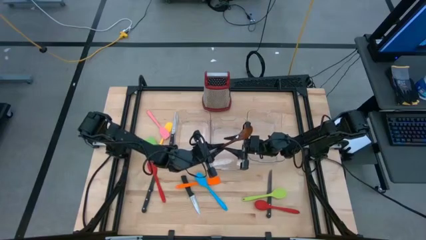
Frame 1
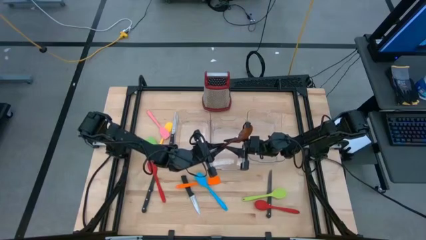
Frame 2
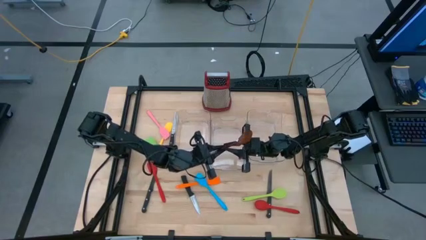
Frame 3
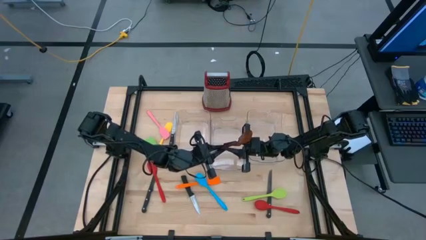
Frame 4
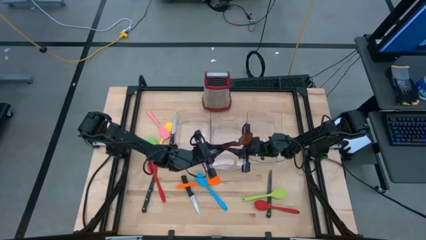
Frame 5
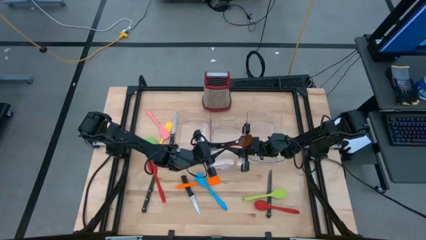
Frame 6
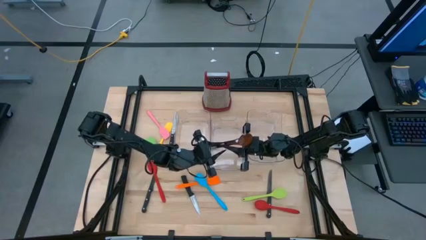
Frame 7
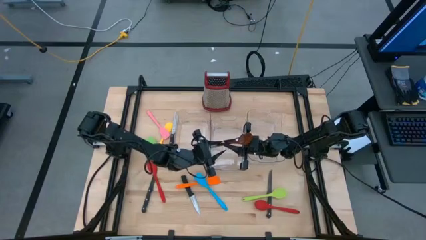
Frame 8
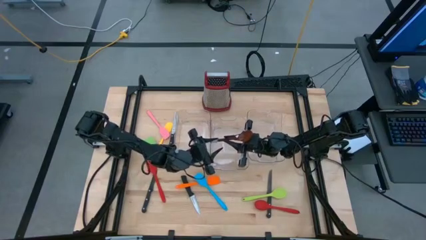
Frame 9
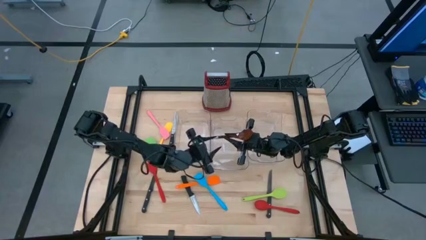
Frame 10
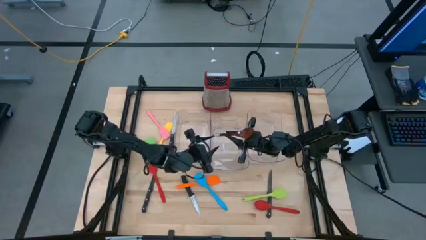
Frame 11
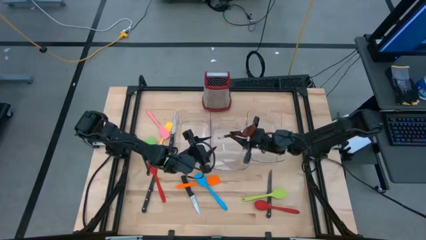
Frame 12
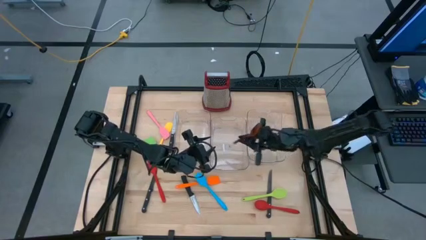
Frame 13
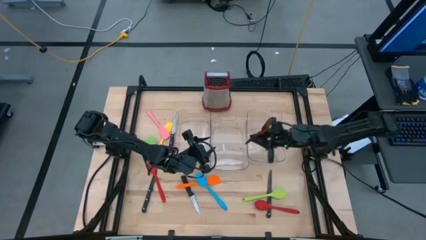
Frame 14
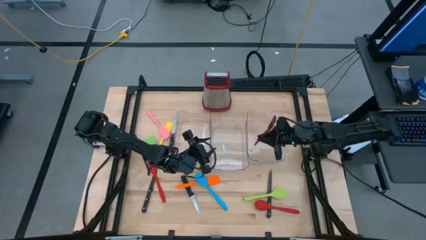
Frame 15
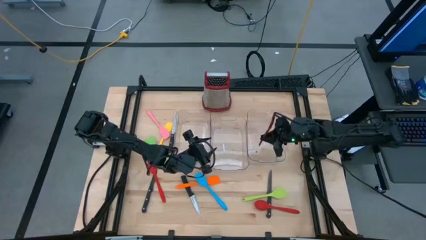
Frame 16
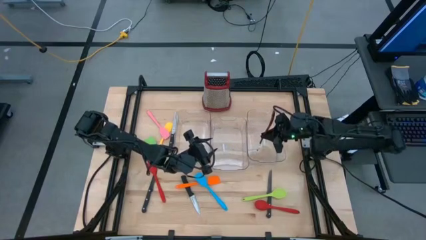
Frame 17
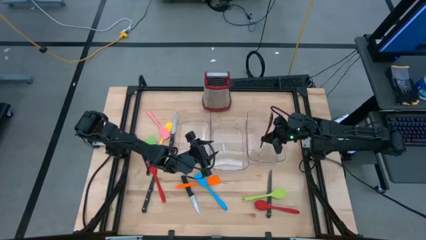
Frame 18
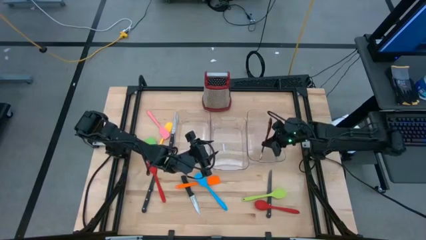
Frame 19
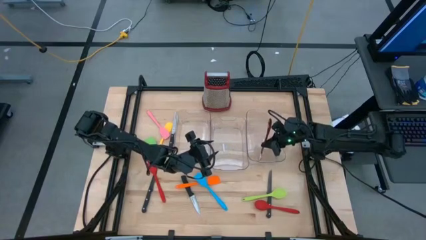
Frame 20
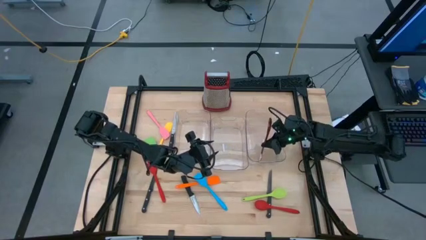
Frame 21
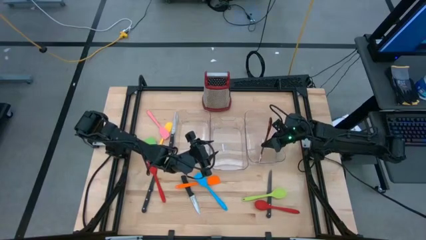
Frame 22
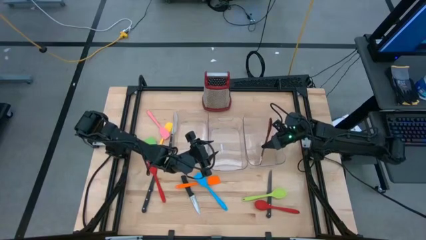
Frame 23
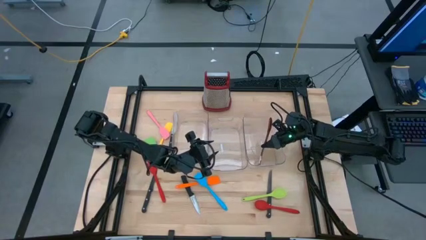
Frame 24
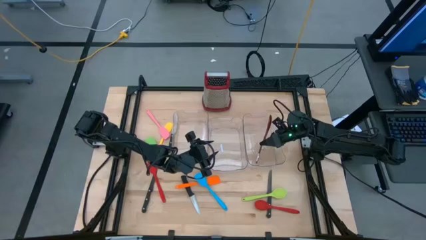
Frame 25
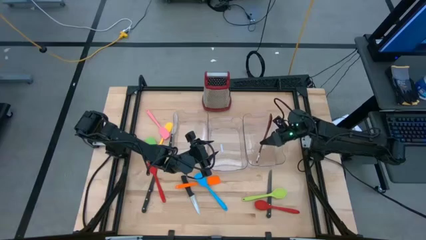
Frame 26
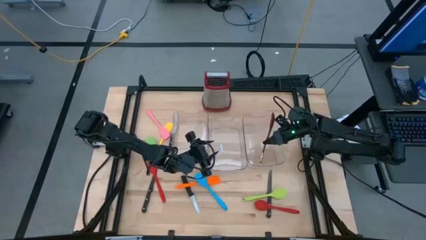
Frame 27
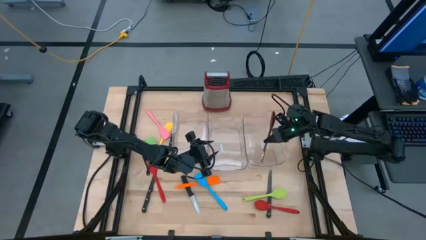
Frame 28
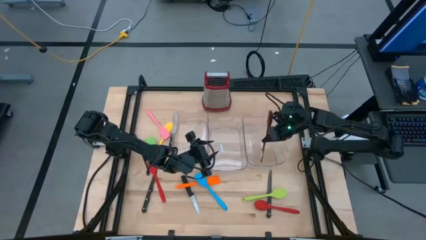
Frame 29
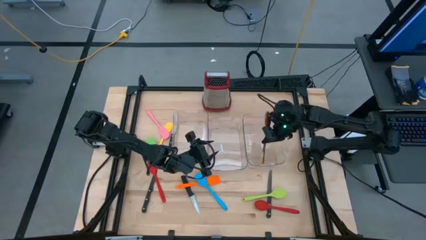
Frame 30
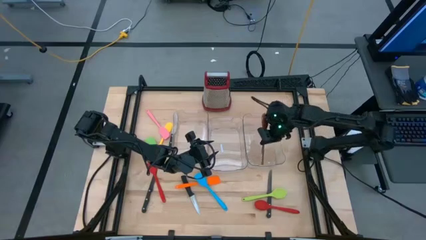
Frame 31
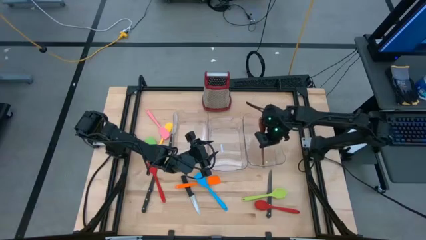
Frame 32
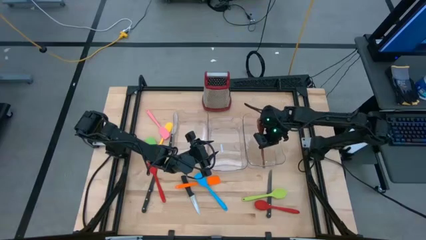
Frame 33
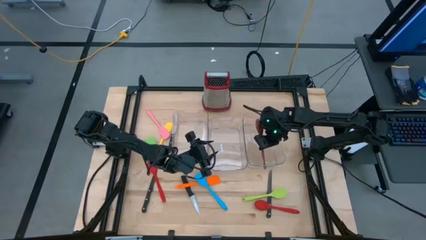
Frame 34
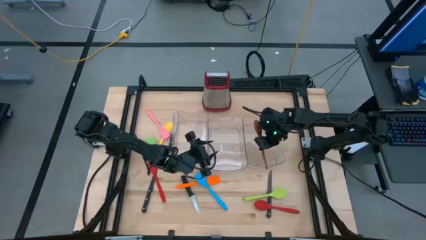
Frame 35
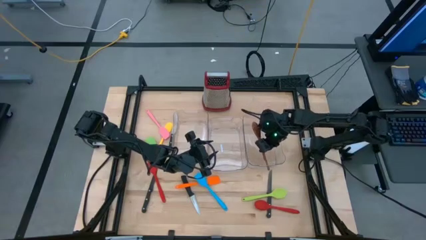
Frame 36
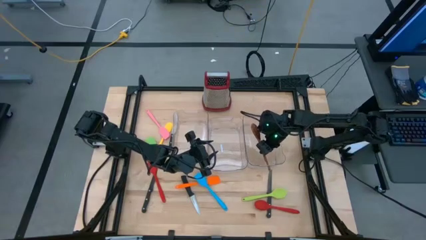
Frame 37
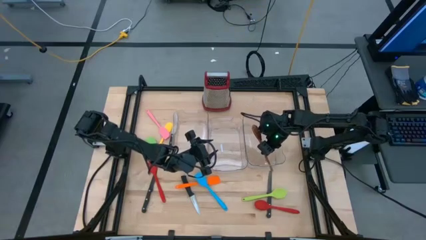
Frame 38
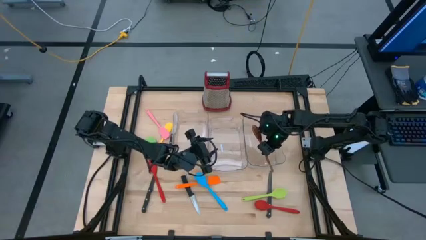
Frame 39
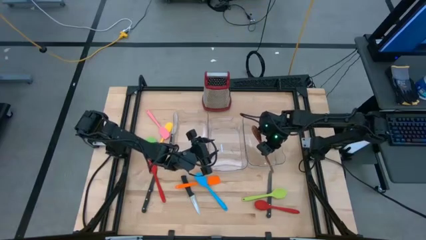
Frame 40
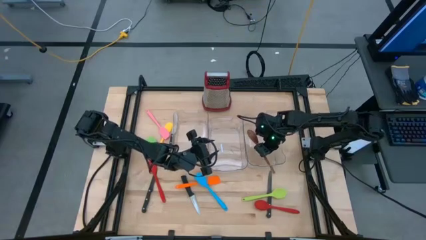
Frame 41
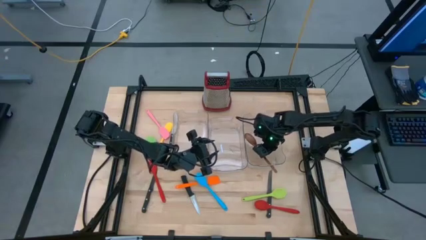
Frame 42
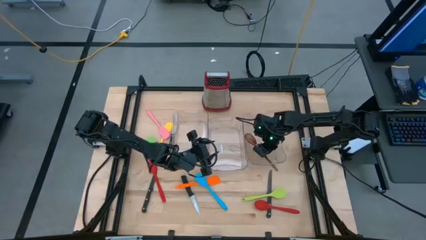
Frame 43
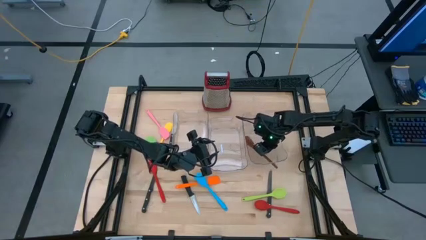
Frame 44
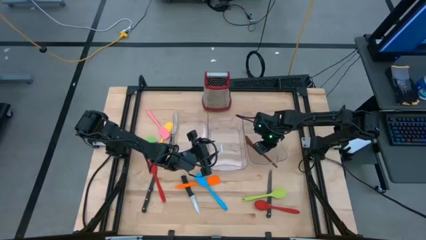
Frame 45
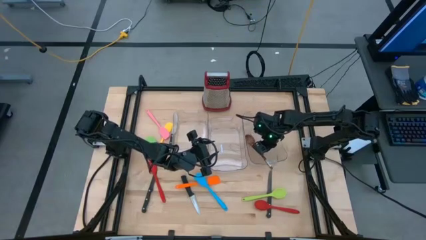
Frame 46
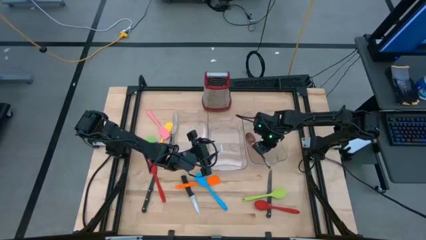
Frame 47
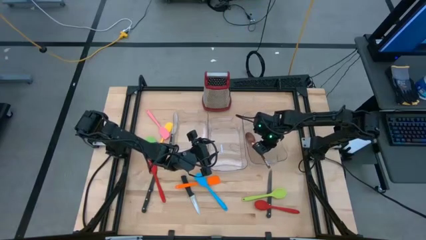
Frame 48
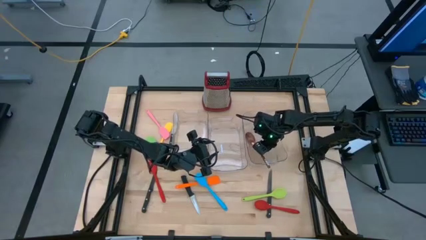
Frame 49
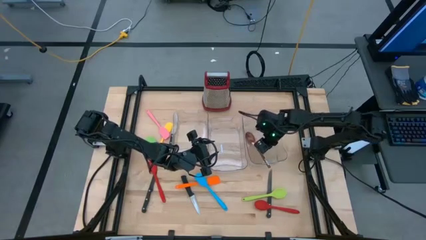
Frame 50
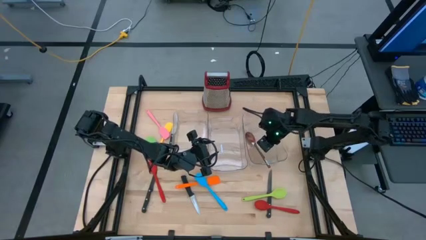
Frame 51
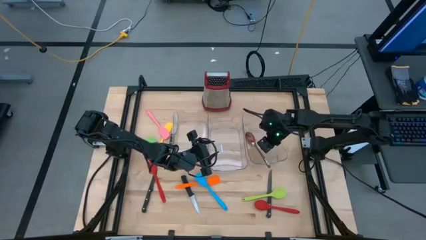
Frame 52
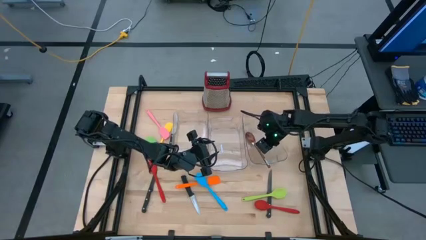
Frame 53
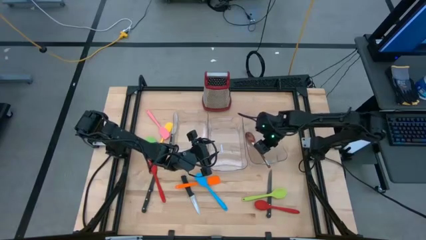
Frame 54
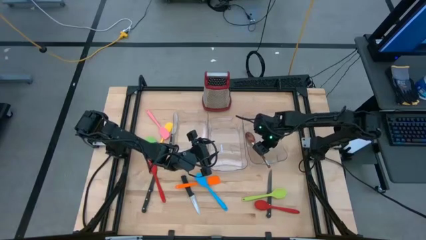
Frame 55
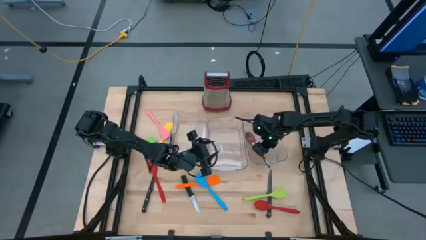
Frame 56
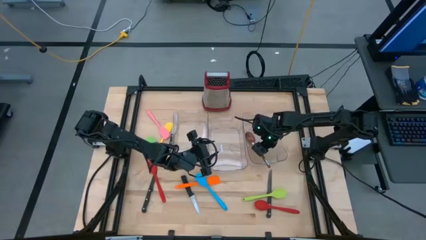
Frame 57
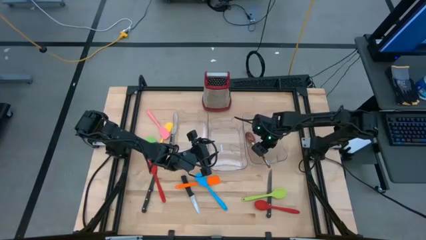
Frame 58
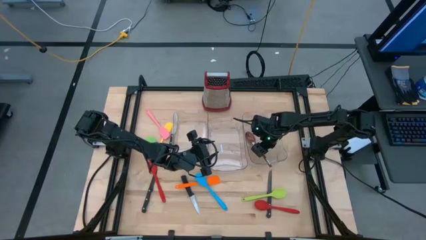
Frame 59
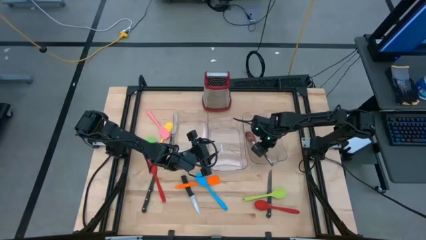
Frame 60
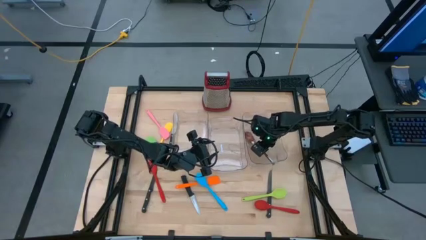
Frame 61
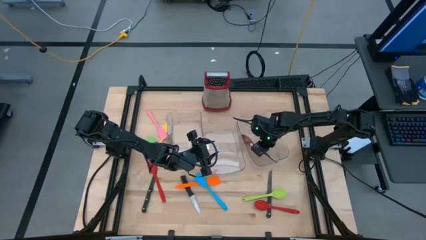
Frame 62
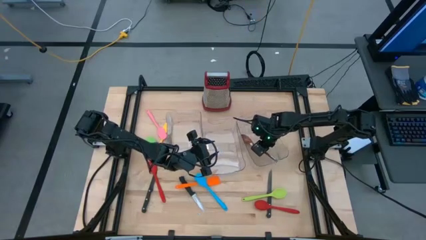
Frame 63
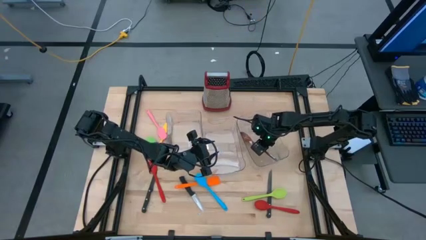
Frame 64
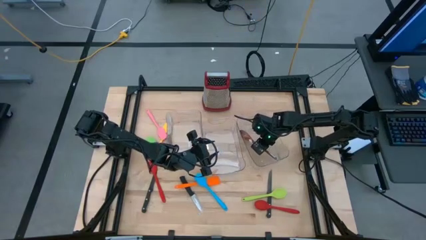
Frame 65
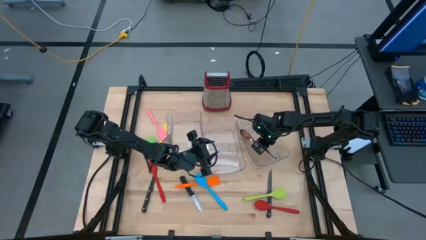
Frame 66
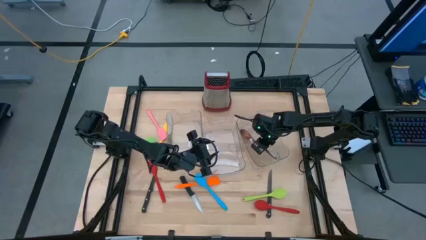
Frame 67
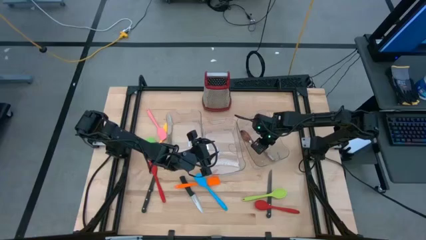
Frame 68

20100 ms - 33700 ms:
Task: Pick & Place Kitchen Items
Put the wooden serving spoon into the right transparent bin

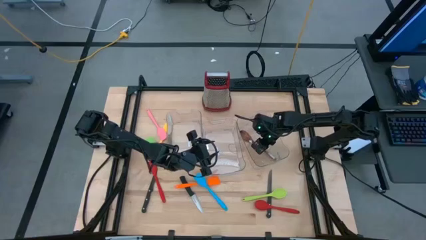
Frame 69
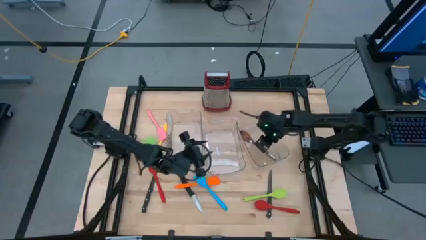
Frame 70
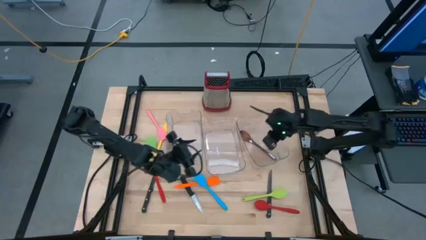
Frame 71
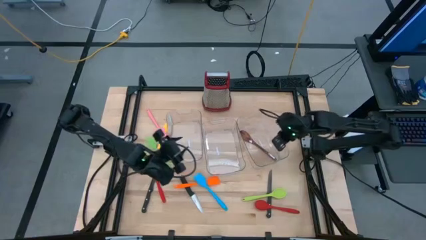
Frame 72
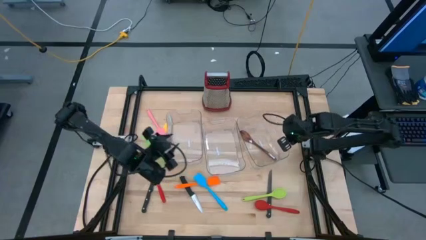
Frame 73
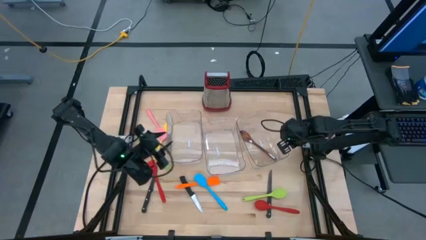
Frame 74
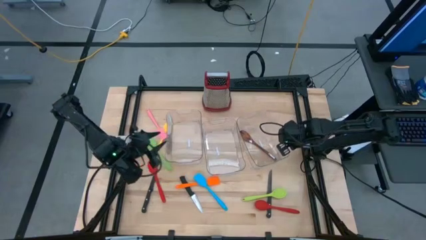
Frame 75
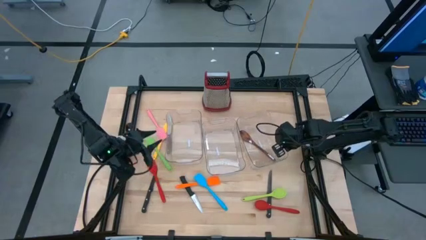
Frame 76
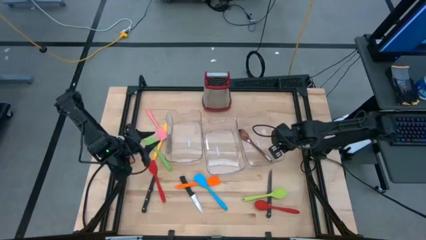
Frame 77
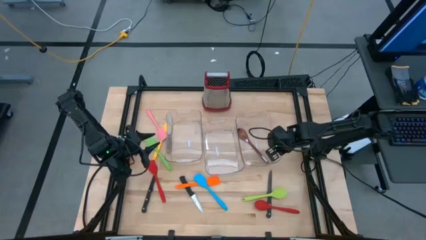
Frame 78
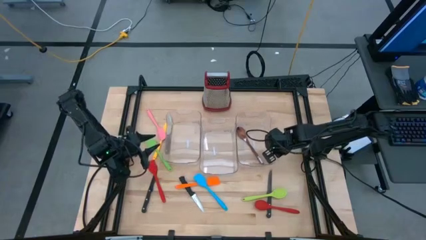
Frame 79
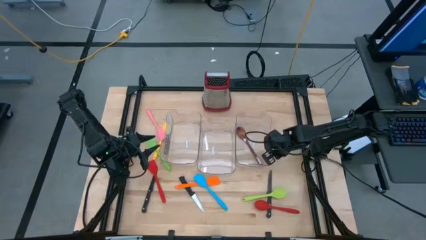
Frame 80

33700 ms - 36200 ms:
Adjust the right transparent bin

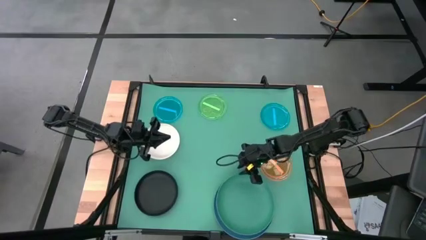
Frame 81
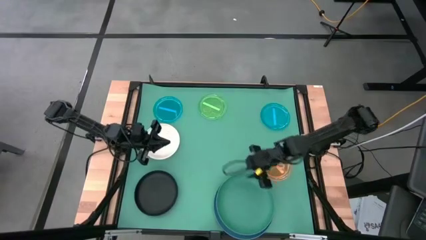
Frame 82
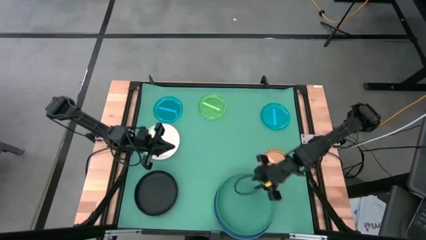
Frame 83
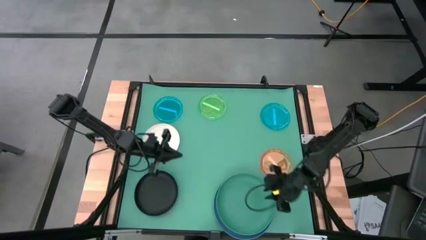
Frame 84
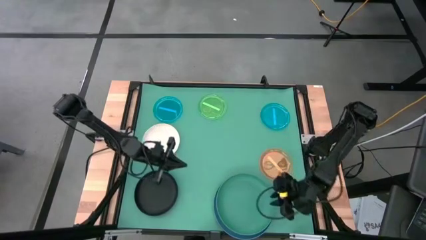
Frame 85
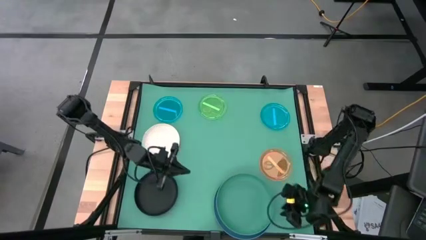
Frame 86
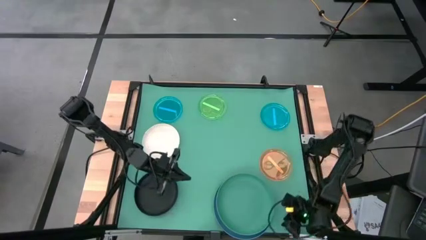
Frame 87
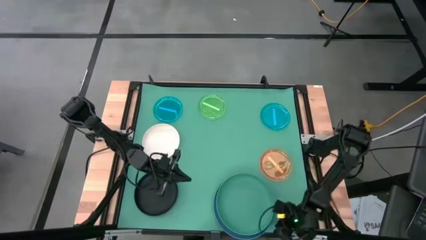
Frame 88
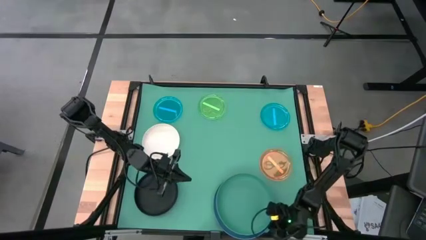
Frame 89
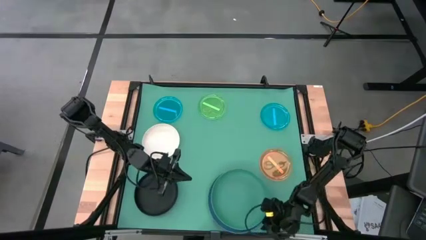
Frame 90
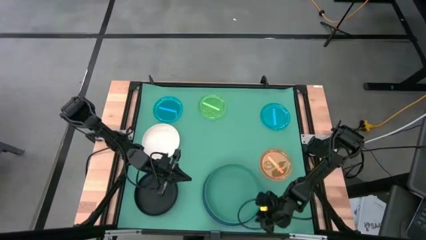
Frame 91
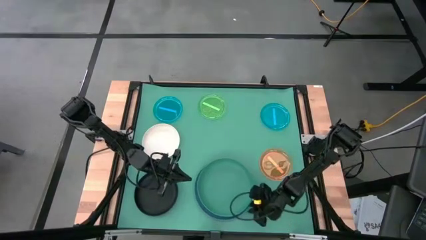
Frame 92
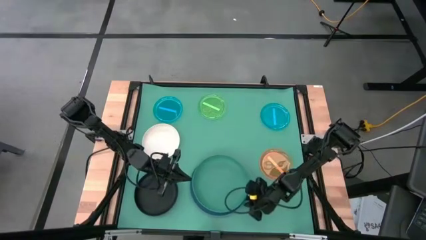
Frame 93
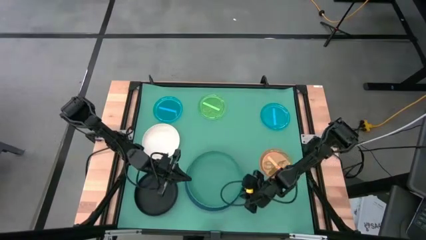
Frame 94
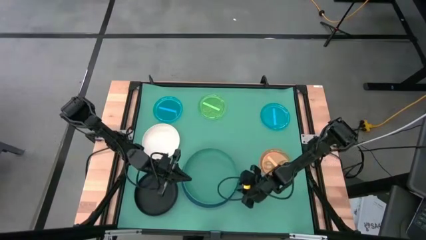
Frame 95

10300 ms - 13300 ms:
Task: Stack plastic plates
Adjust the stacked plates
